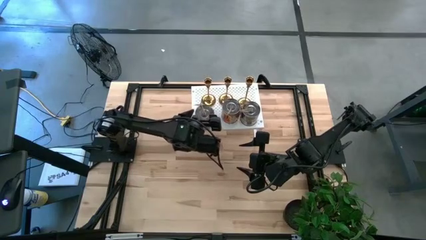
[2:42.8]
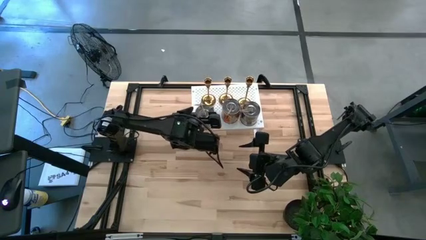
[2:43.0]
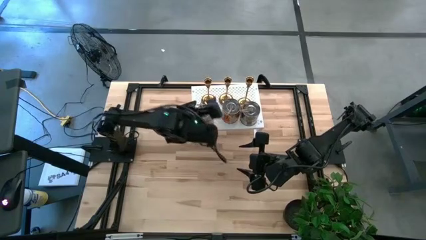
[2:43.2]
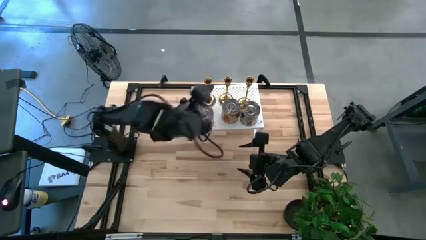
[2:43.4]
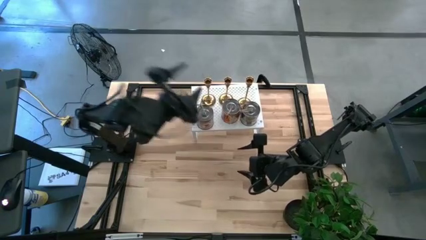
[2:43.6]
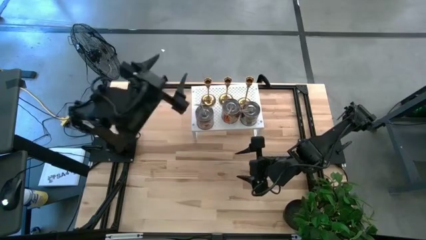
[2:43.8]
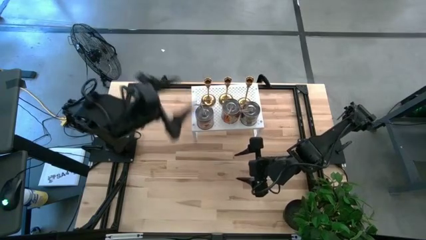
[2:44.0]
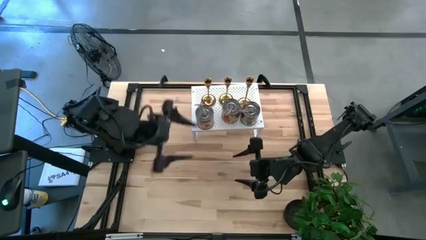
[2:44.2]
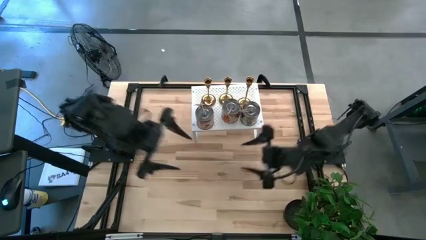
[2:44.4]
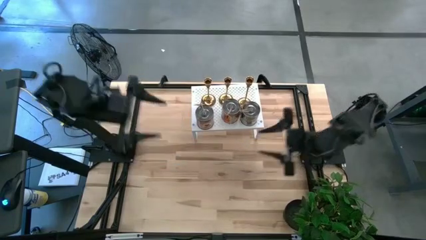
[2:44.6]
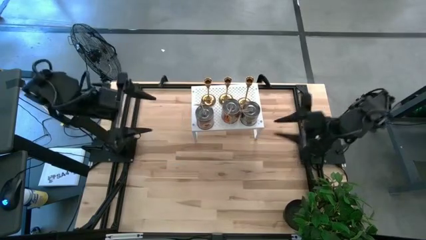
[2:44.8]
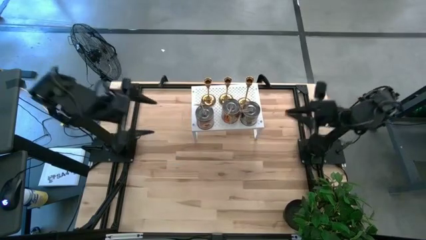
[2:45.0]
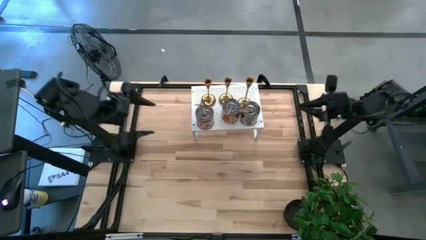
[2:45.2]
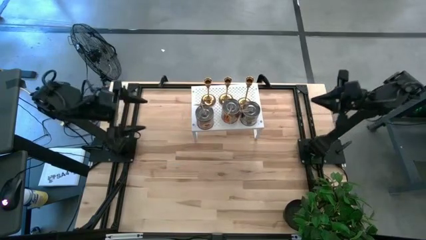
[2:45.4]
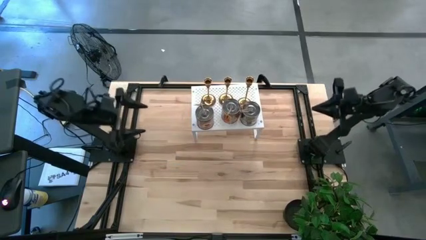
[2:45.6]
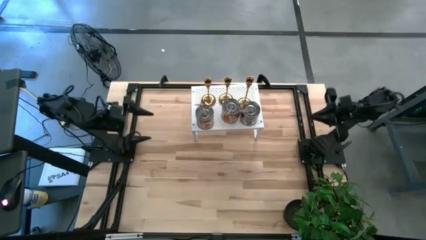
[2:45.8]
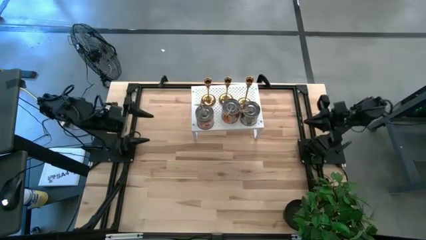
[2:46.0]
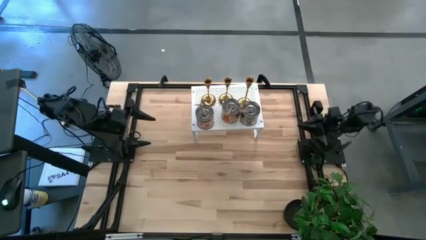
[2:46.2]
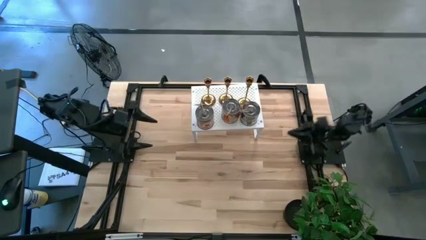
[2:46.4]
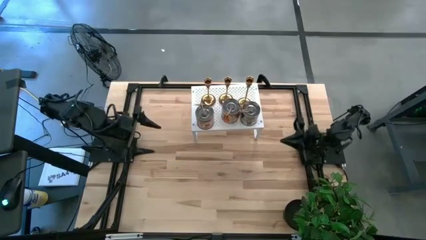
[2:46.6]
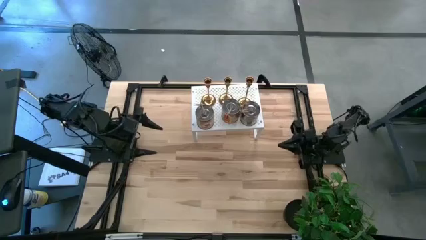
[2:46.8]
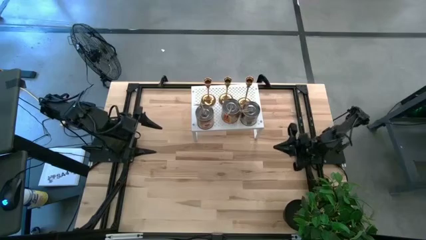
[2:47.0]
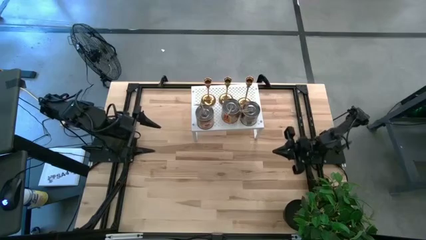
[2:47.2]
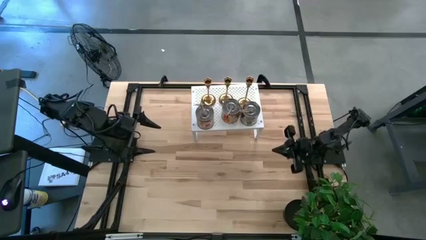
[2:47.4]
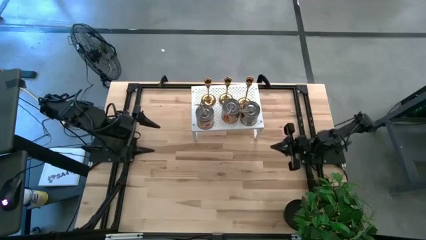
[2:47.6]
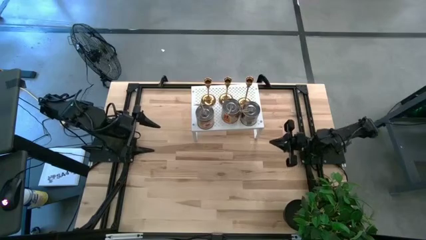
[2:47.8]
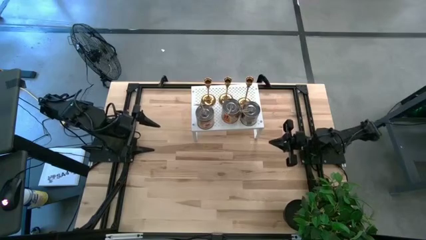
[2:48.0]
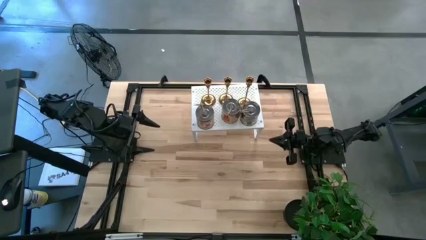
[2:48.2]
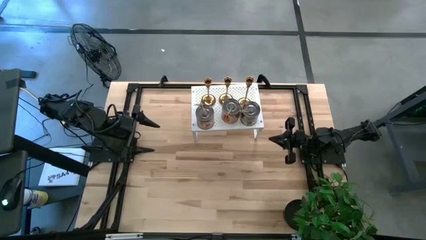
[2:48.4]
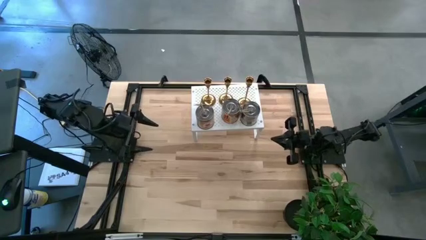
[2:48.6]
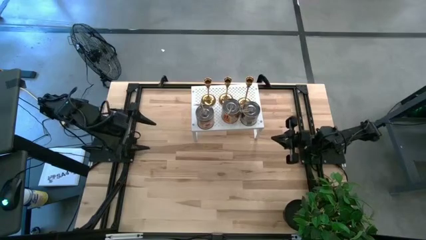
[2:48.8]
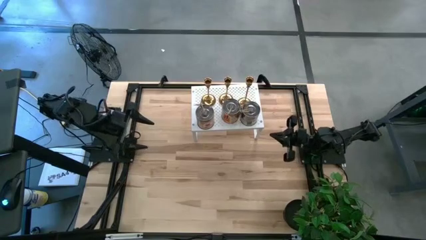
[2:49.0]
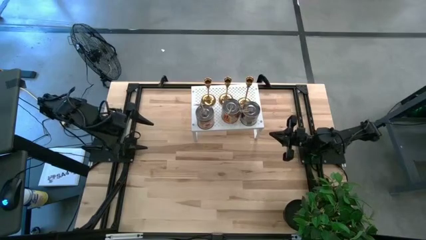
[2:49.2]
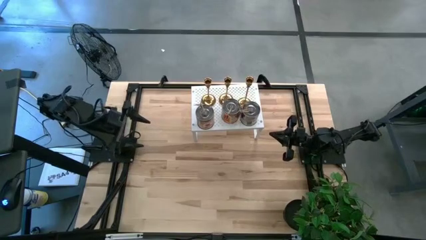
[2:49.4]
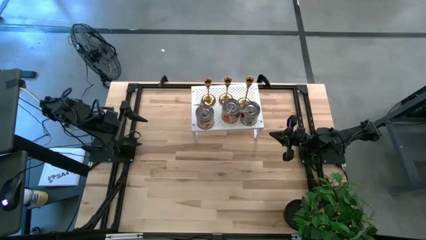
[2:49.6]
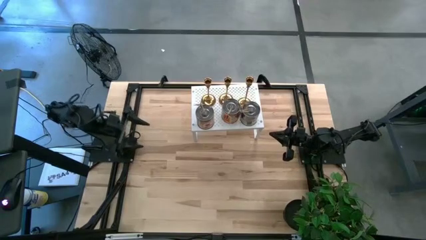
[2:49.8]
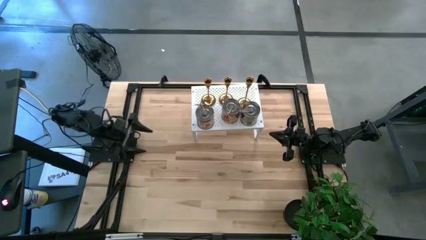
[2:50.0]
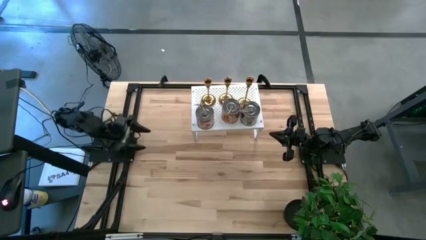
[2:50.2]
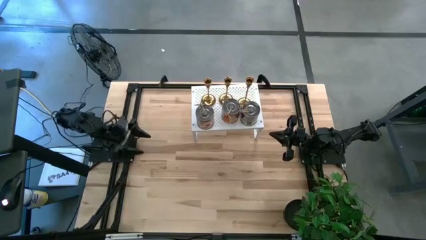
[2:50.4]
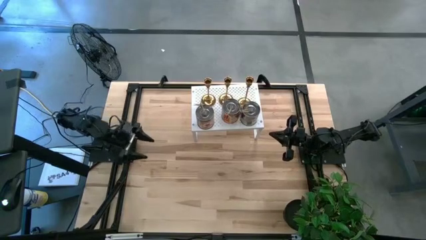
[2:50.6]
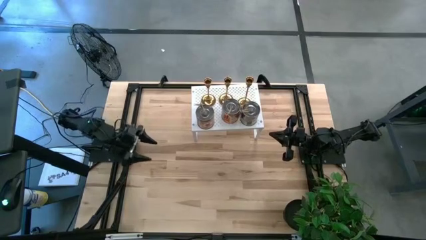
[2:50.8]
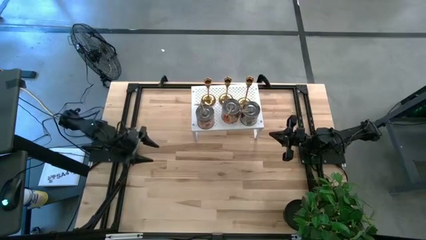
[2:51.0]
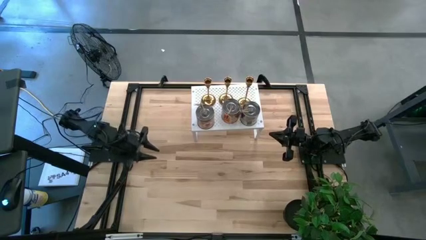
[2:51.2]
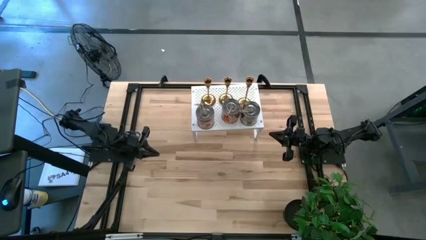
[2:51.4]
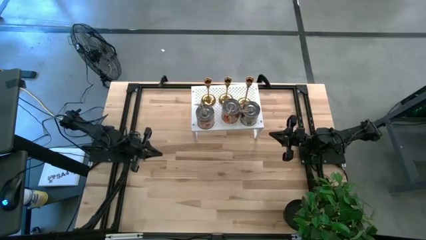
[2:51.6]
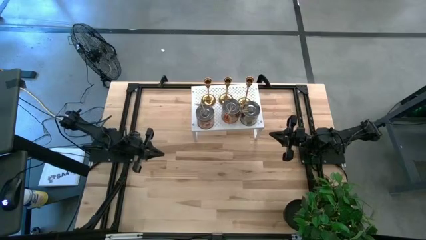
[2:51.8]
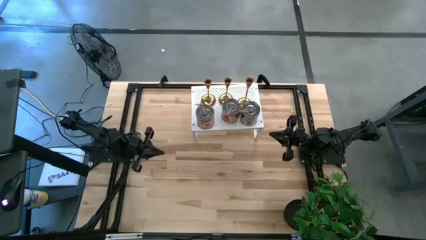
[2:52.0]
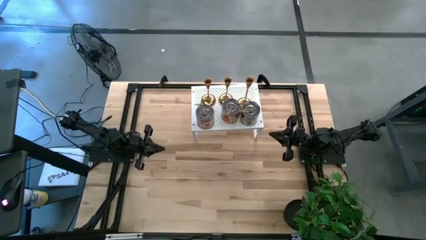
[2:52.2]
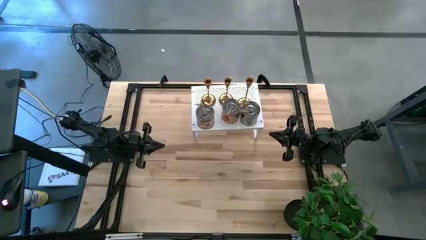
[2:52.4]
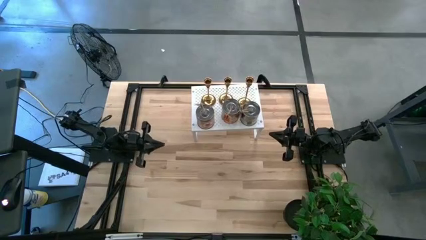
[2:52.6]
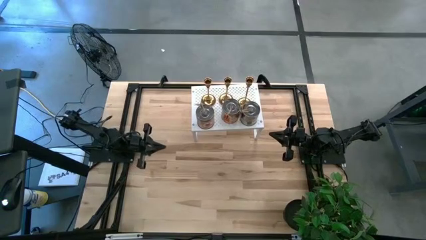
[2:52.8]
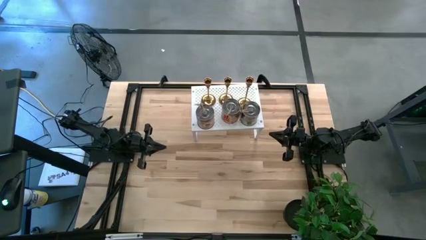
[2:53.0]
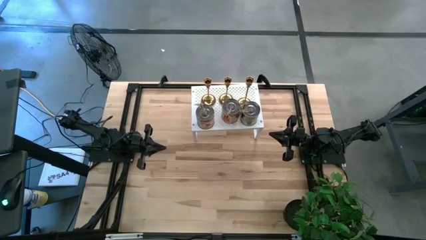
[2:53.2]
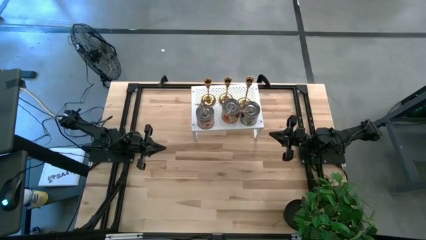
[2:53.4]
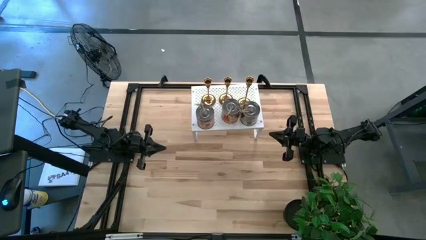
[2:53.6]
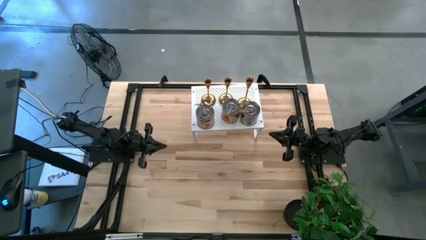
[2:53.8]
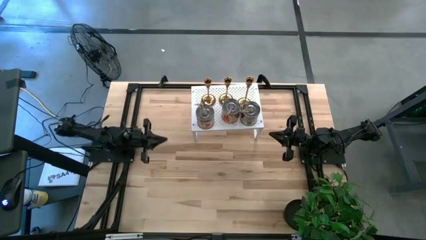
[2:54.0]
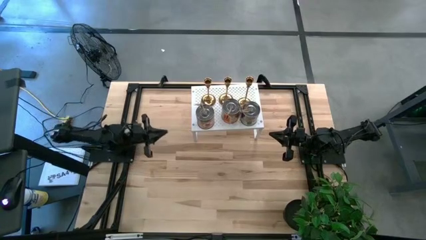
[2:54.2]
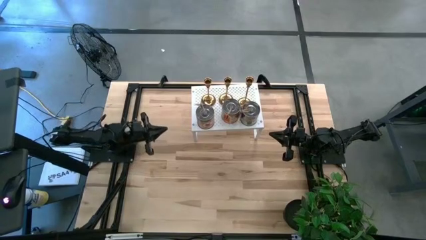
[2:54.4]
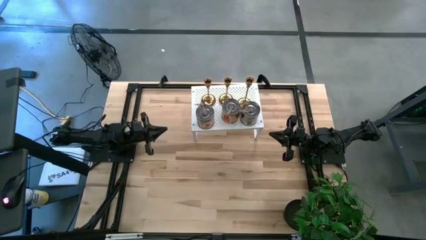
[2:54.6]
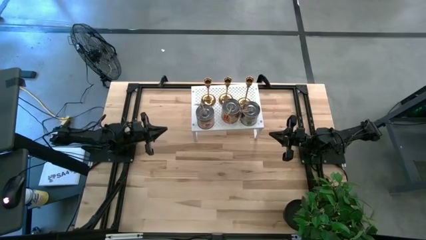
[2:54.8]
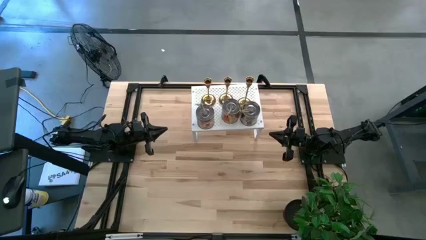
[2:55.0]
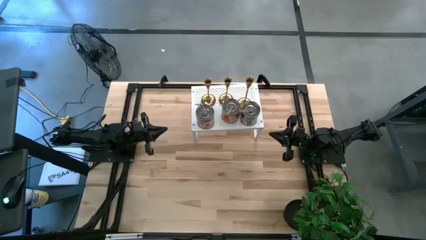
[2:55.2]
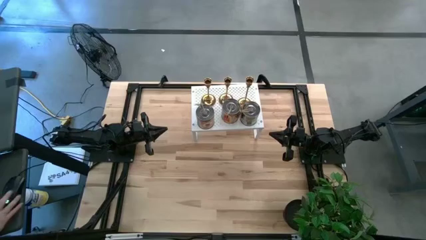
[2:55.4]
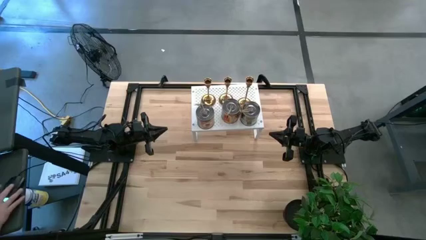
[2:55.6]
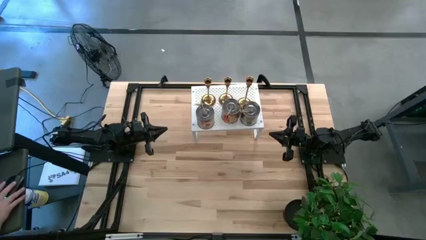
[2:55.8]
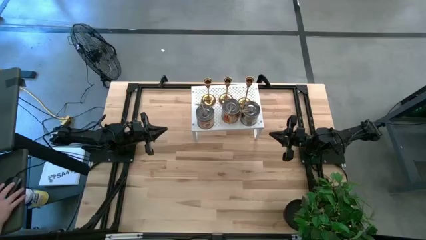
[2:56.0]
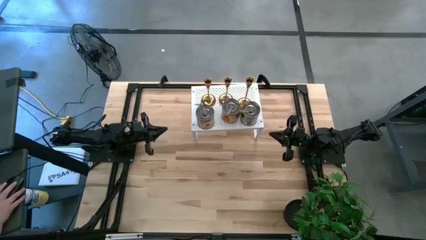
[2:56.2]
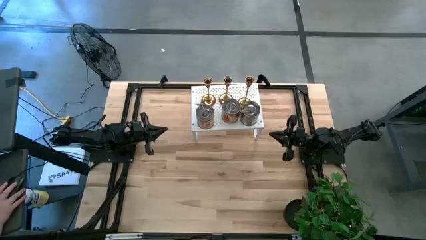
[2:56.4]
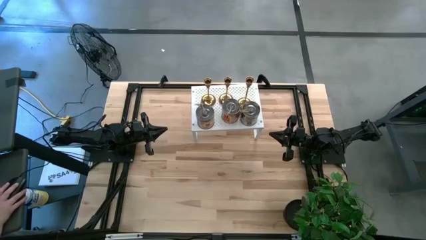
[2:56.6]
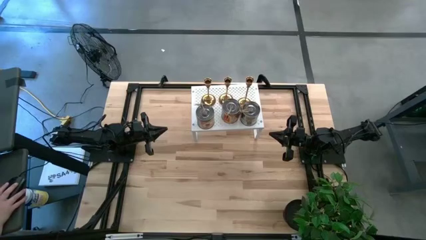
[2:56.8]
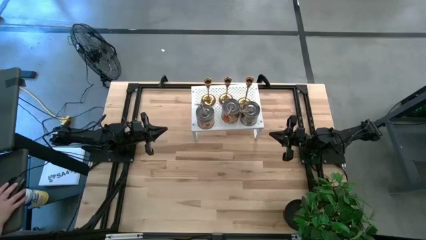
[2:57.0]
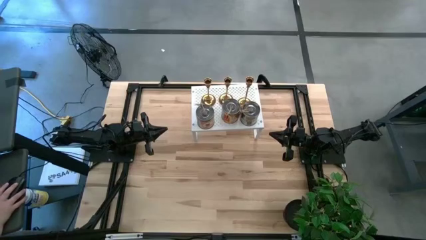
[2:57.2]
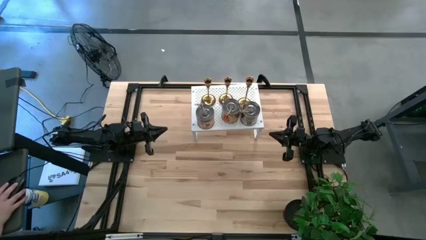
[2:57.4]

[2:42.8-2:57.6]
Task: Pick & Place candle stick holders
Return to Home Position

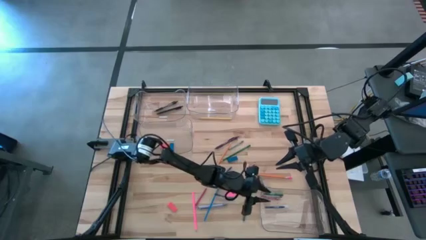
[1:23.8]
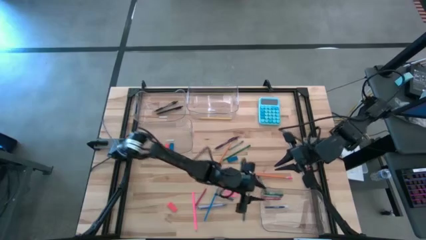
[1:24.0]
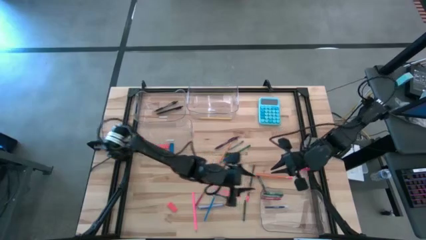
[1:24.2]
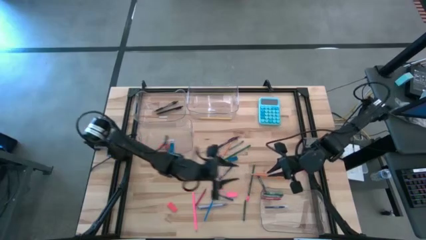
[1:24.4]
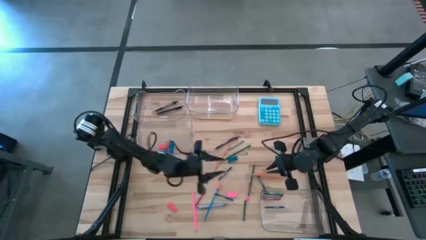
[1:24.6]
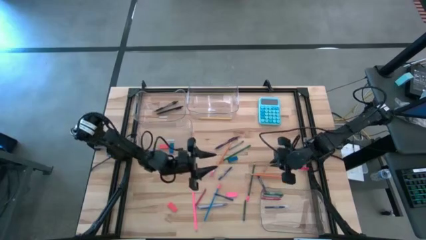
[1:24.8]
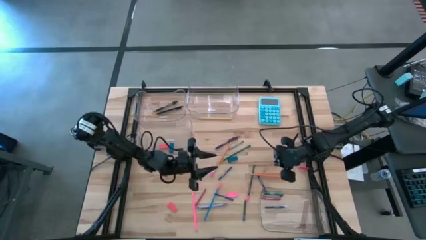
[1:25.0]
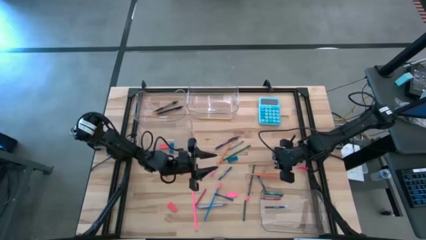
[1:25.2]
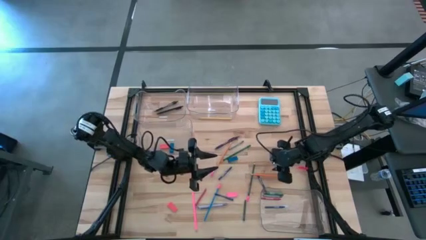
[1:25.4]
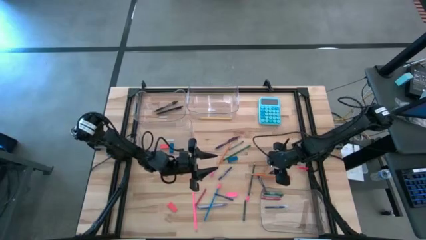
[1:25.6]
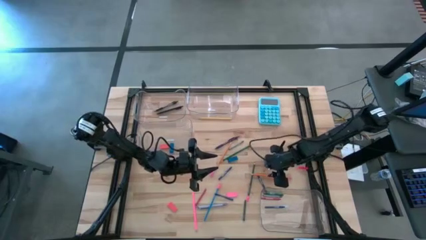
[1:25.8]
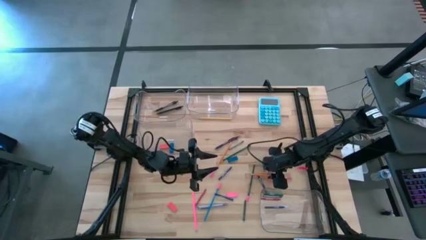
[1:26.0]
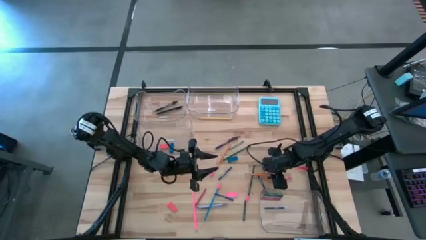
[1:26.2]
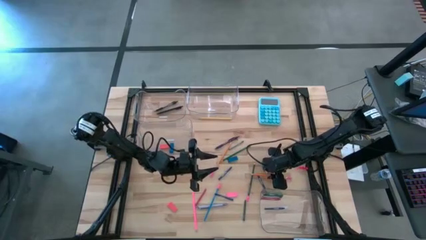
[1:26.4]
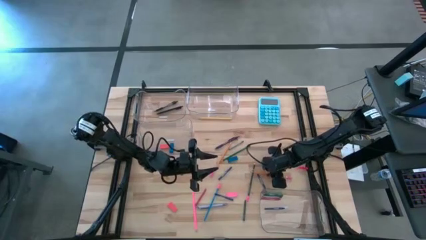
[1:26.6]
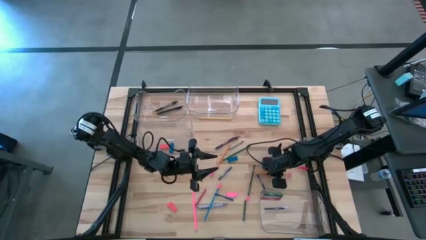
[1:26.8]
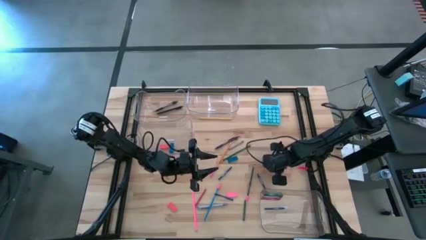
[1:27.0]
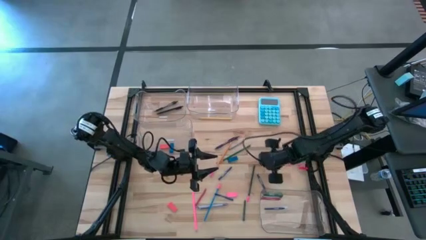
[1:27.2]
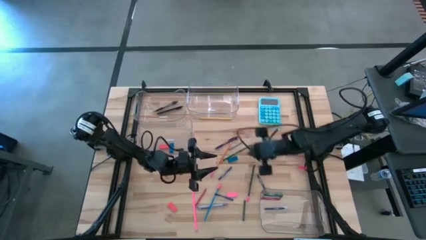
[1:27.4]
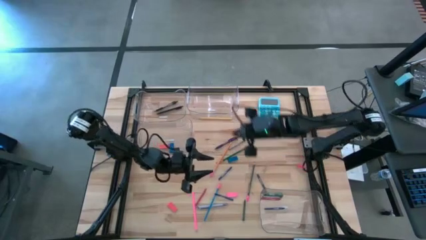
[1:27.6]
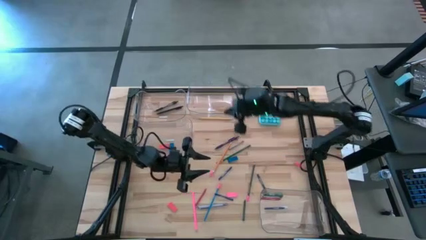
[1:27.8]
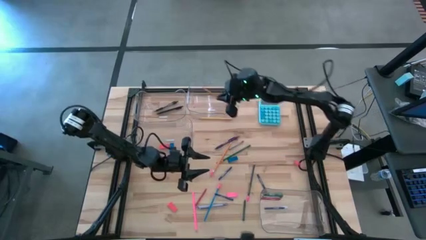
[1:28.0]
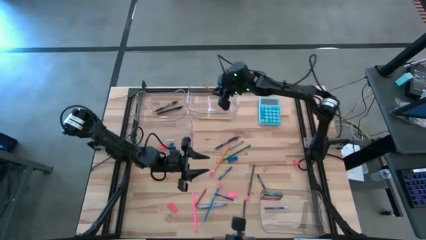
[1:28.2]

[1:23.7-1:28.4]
Task: Sort crayons/erasers/pens/pencils in bins
Put the yellow pencil into the top right transparent bin
